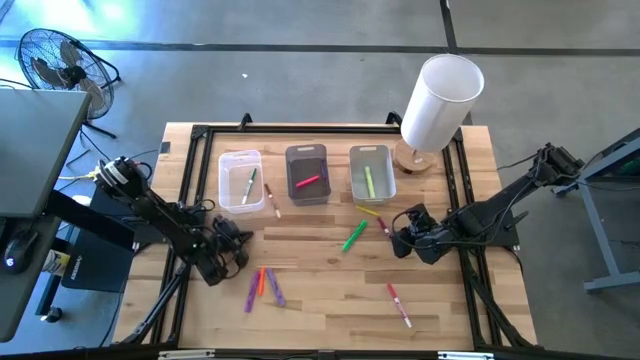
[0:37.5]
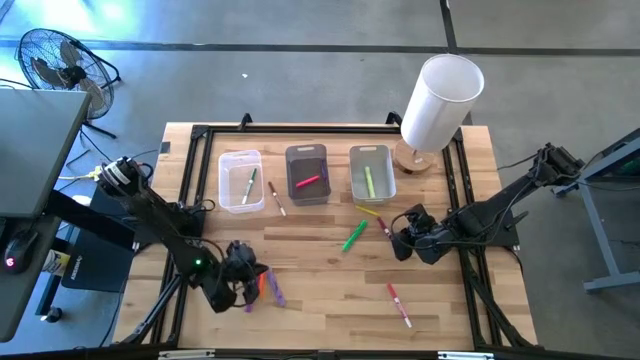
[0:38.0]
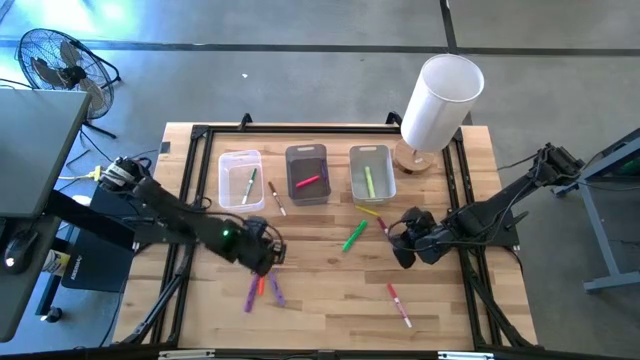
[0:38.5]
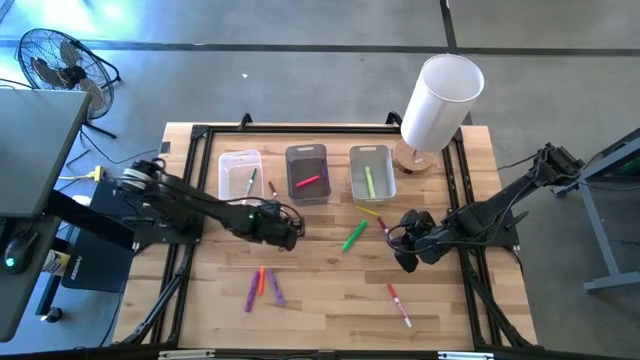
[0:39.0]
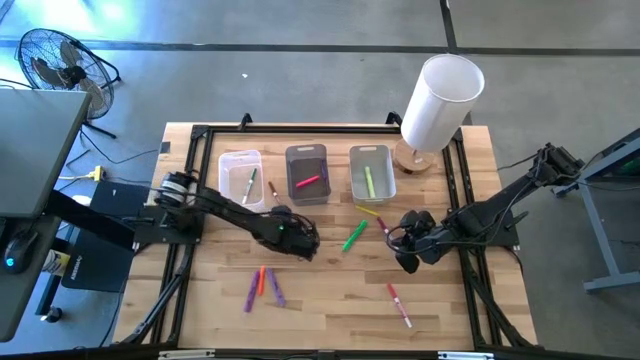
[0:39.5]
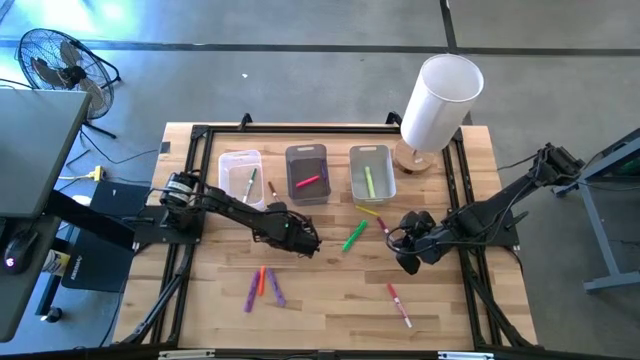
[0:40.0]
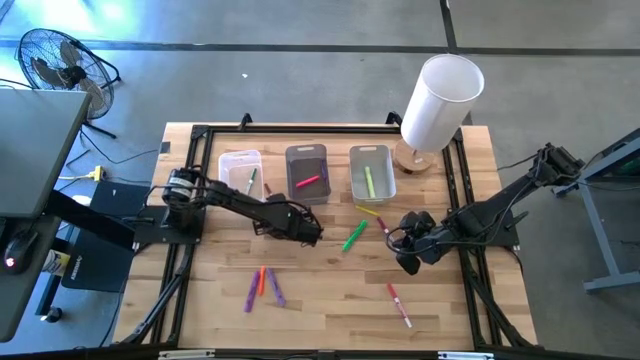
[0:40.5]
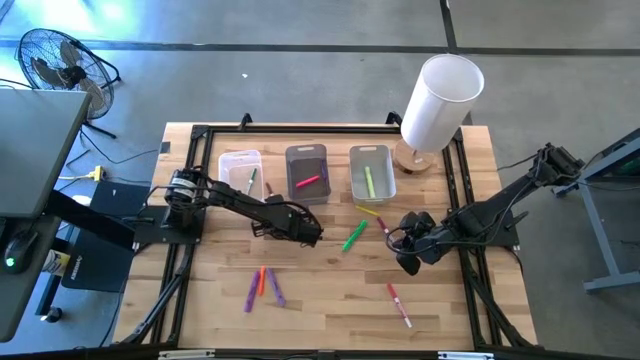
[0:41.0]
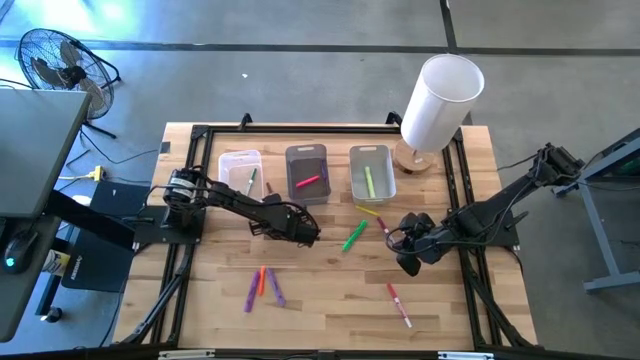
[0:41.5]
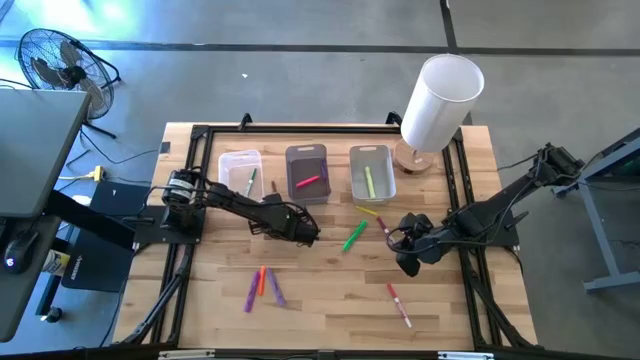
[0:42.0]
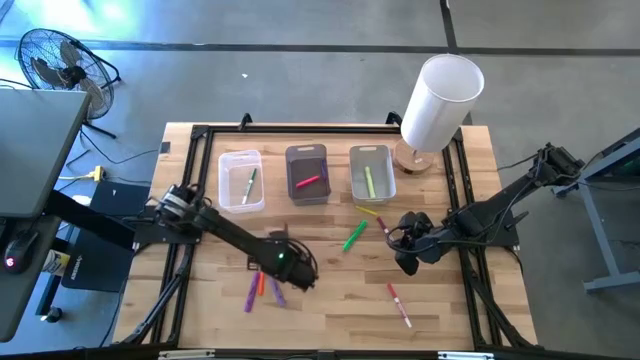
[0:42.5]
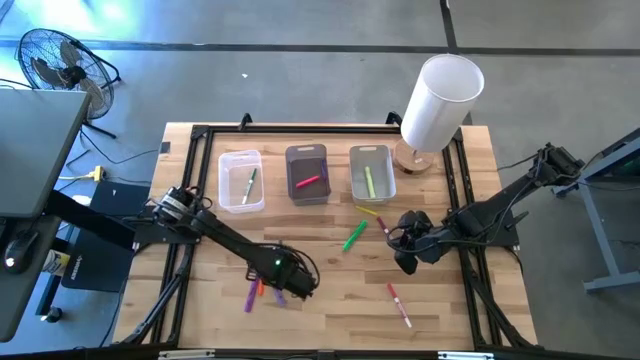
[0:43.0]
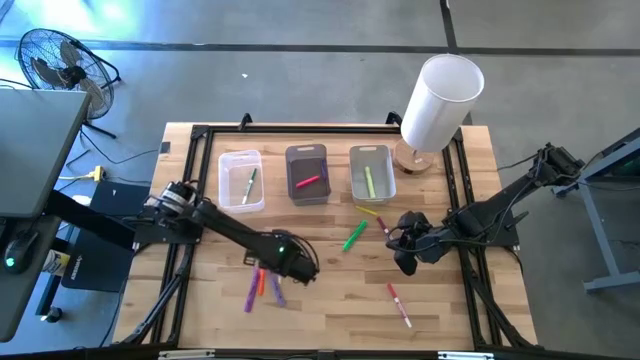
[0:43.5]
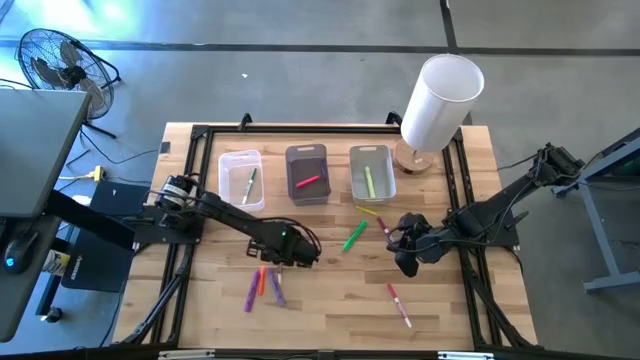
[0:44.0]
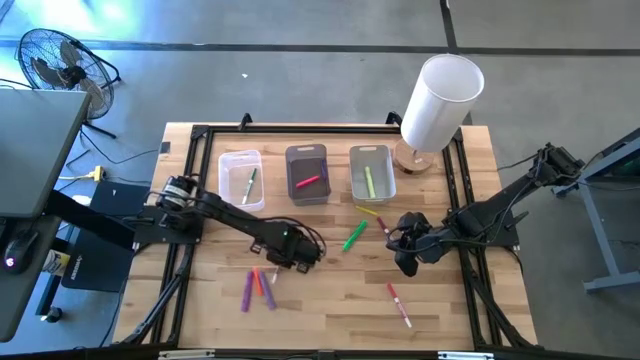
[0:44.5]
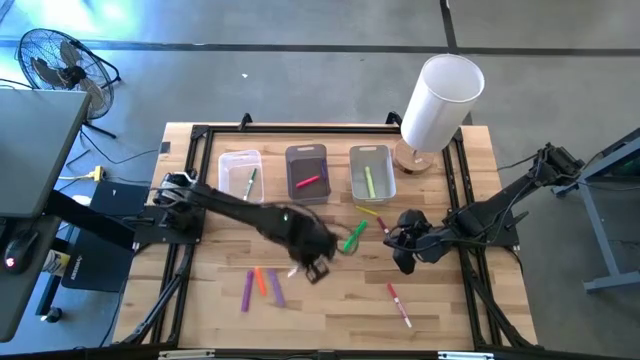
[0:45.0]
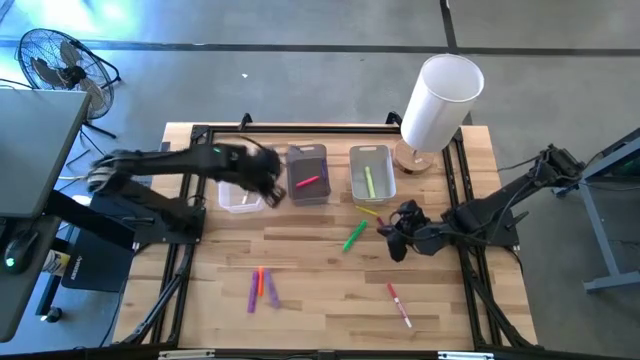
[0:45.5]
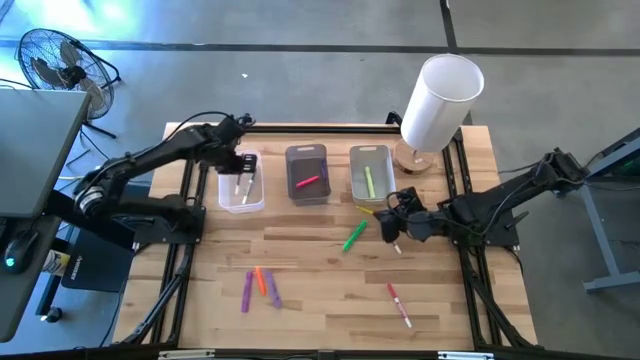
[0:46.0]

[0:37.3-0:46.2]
Task: Pick & Place Markers
Put the brown marker pen into the transparent bin

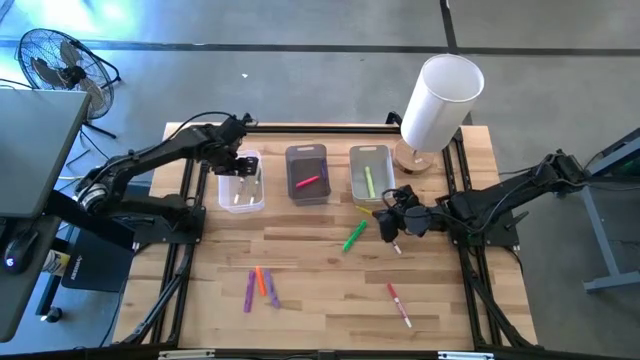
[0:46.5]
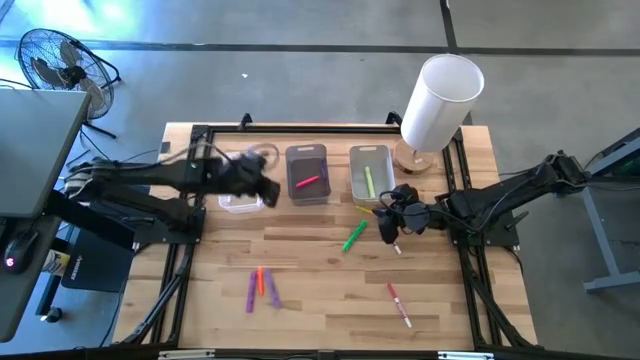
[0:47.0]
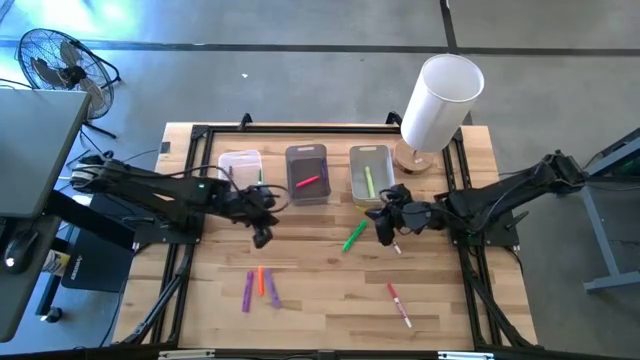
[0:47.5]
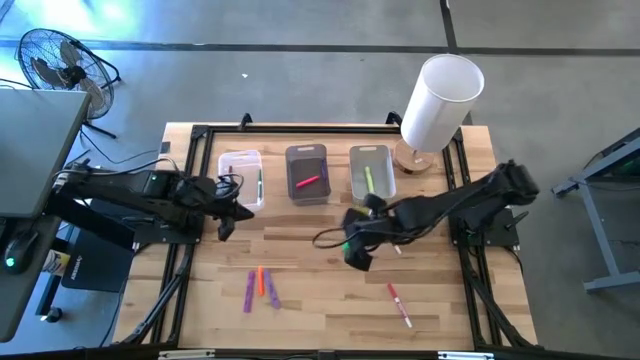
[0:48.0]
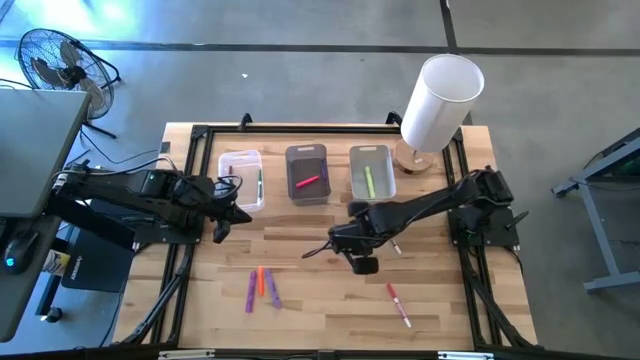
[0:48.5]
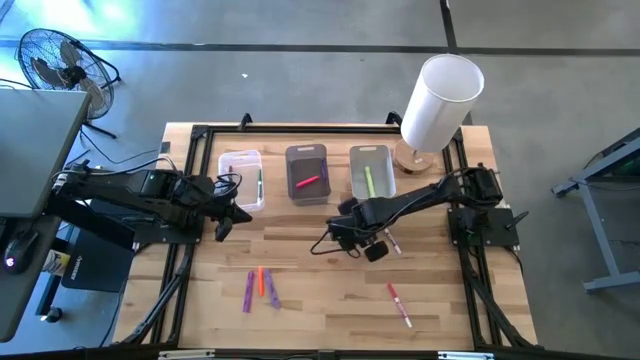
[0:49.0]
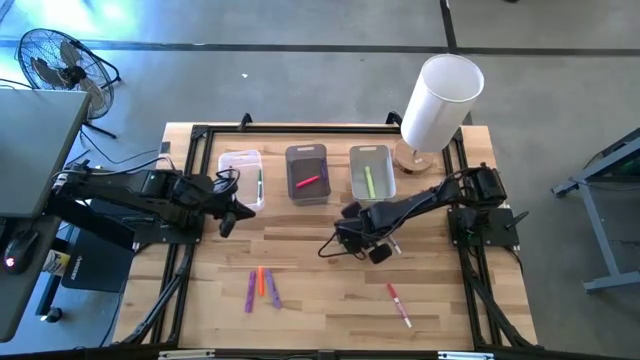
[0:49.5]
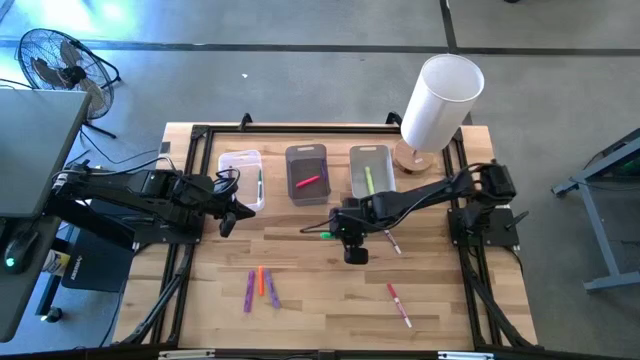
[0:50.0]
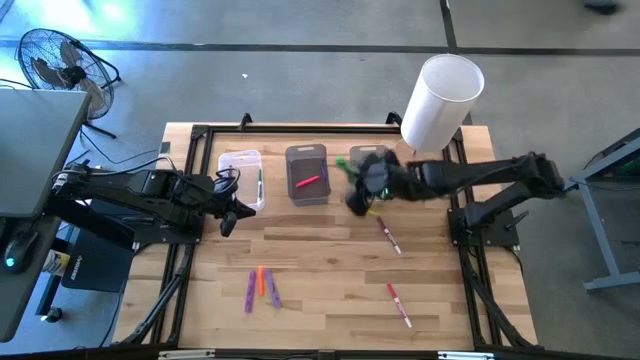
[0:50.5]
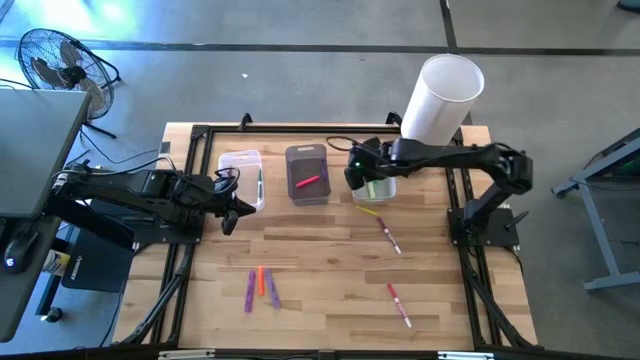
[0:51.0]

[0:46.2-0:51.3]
Put the green highlighter pen into the gray bin

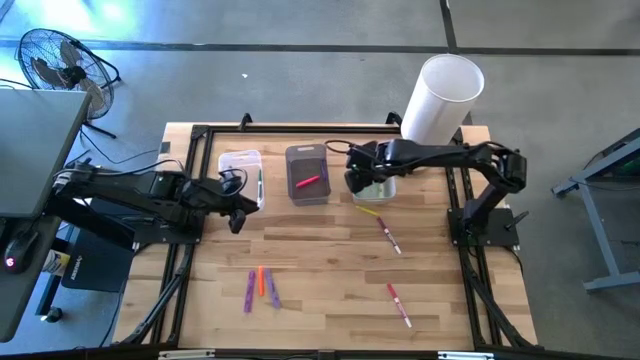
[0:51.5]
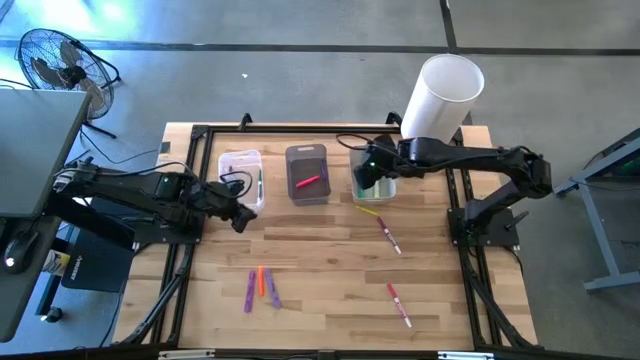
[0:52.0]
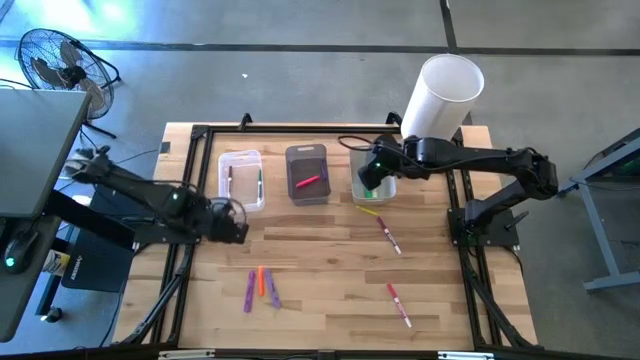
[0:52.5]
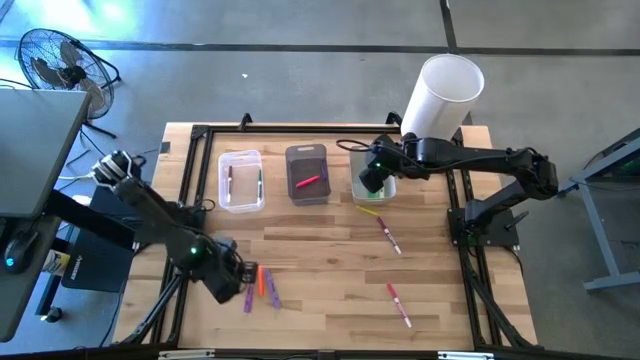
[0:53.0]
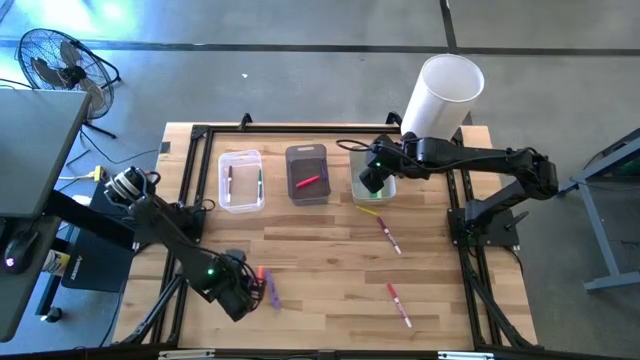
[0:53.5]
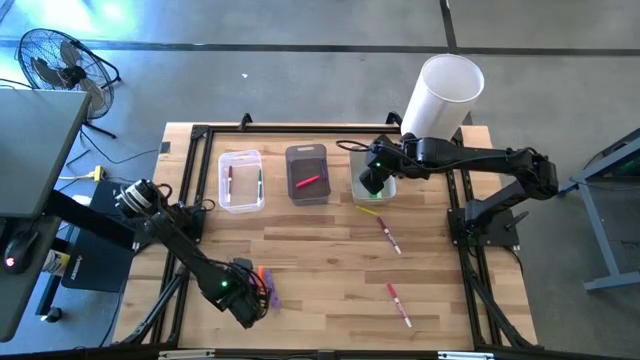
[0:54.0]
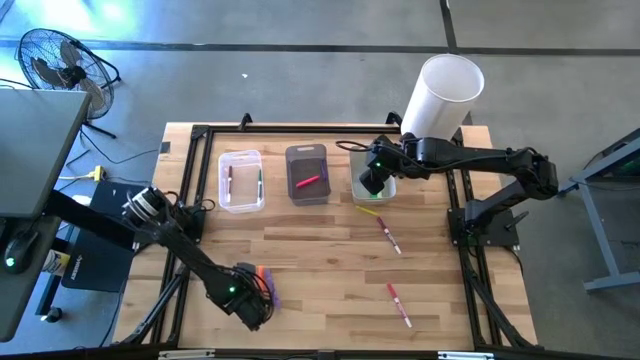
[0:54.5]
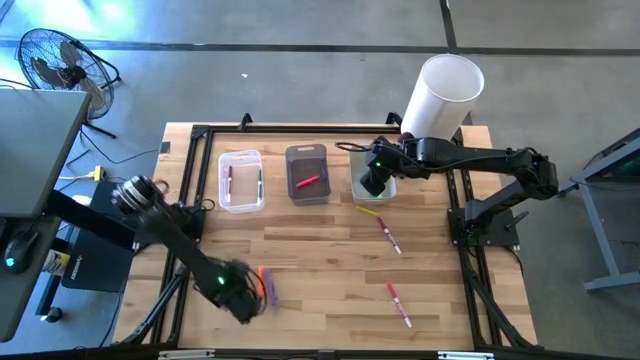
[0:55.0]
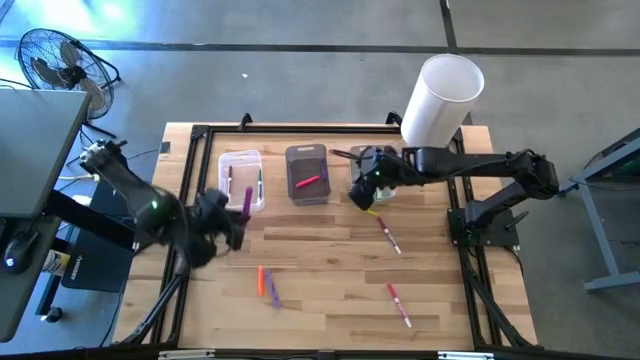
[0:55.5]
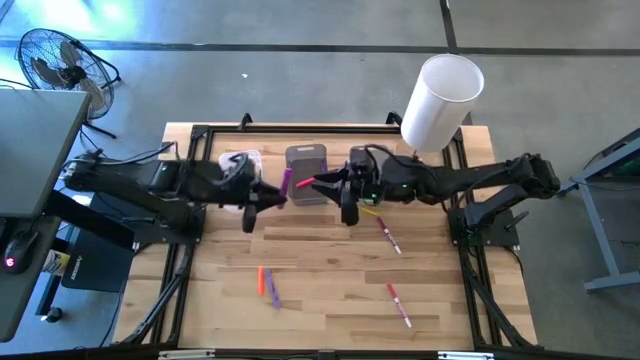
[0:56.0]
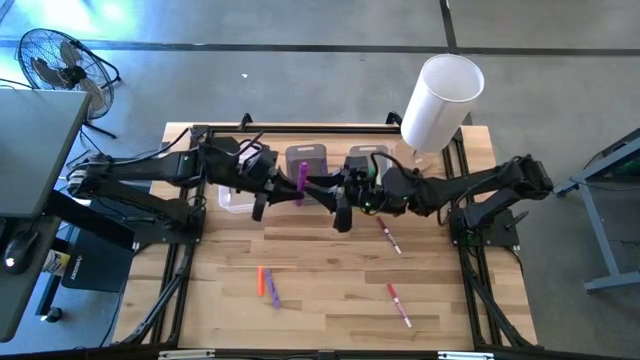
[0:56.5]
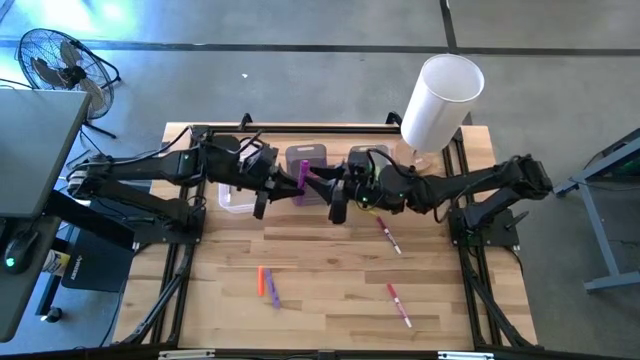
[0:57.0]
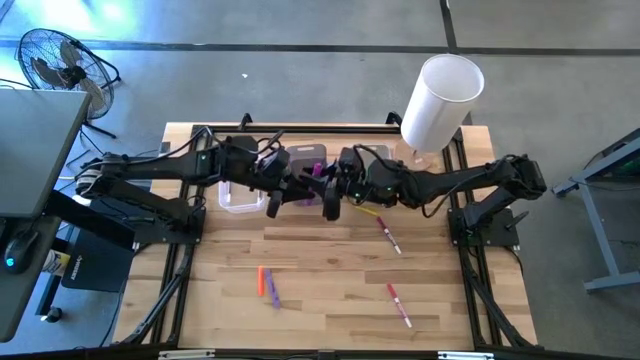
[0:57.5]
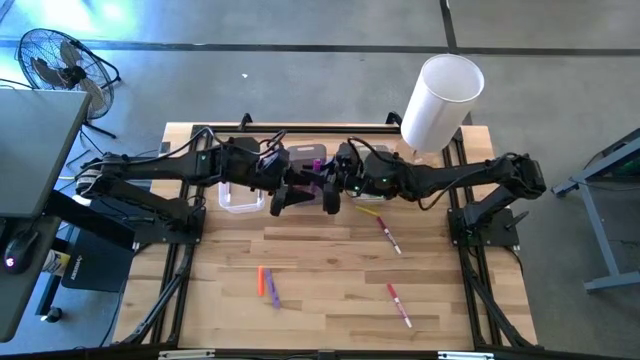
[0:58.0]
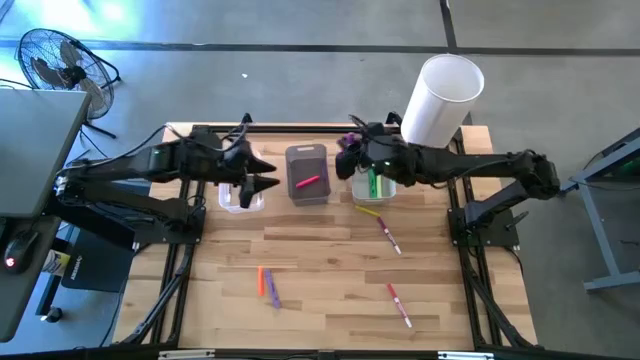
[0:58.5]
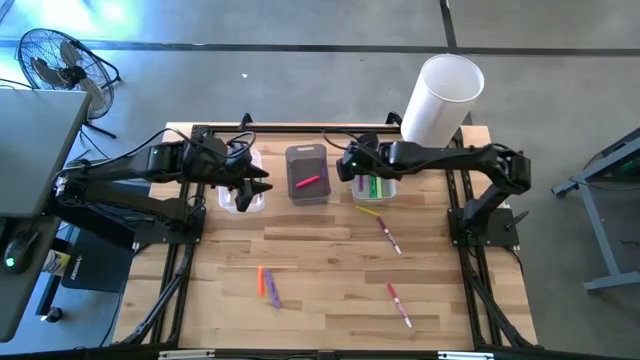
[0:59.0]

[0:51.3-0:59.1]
Put the pink highlighter pen into the gray bin
